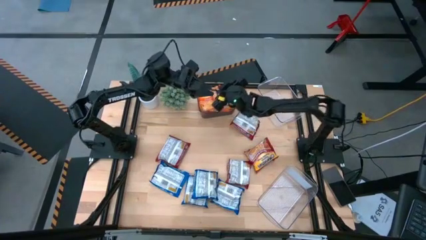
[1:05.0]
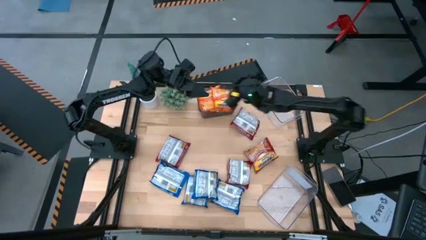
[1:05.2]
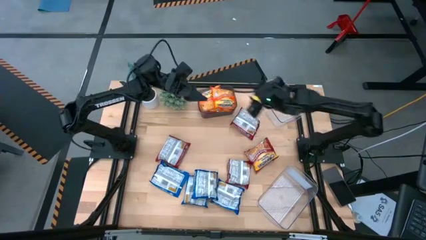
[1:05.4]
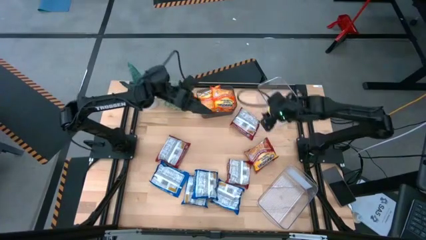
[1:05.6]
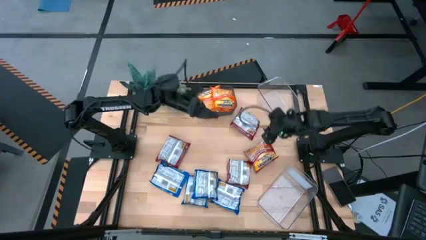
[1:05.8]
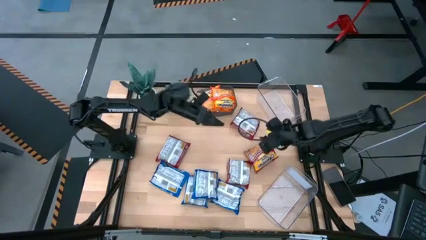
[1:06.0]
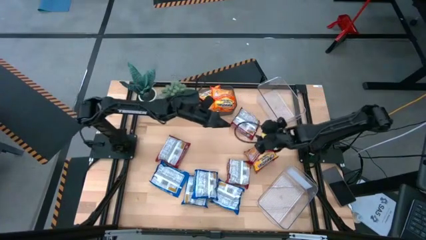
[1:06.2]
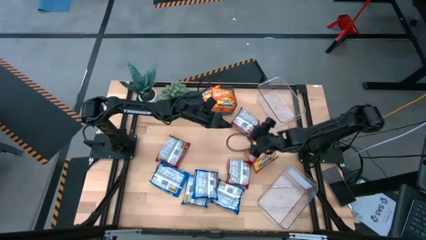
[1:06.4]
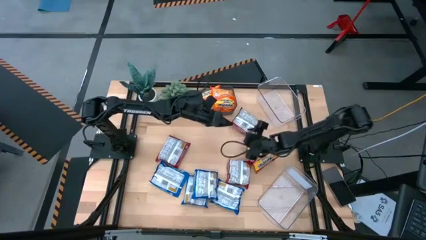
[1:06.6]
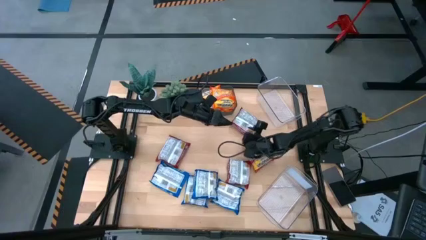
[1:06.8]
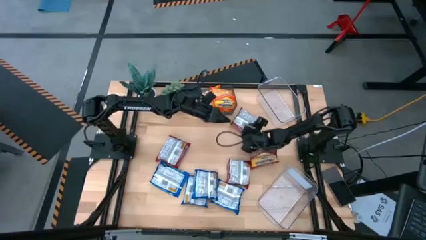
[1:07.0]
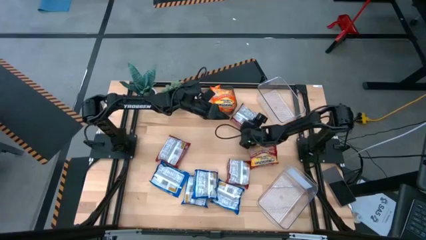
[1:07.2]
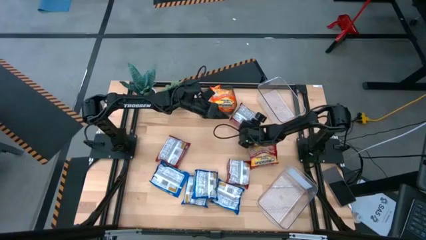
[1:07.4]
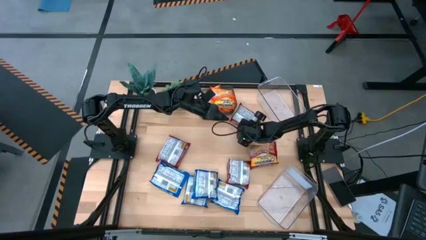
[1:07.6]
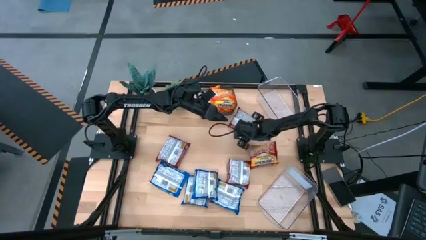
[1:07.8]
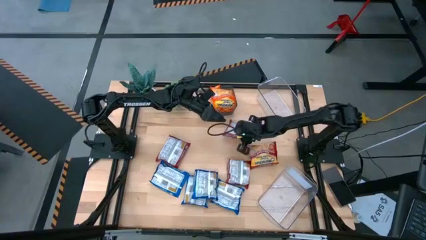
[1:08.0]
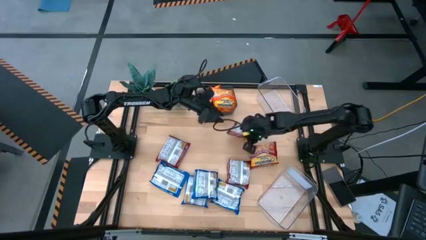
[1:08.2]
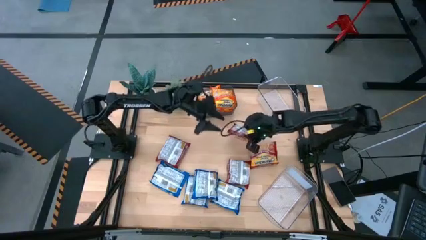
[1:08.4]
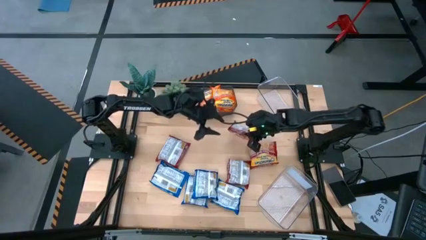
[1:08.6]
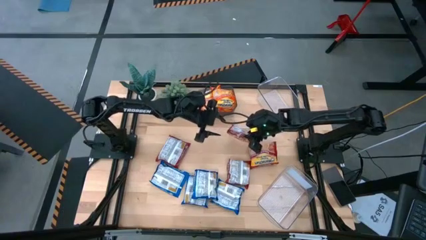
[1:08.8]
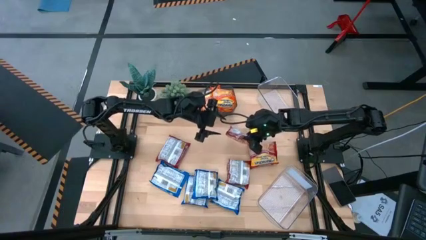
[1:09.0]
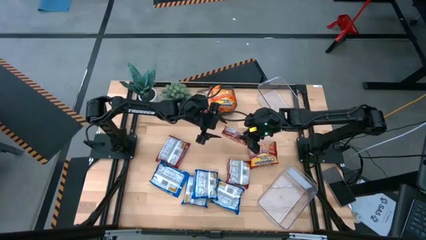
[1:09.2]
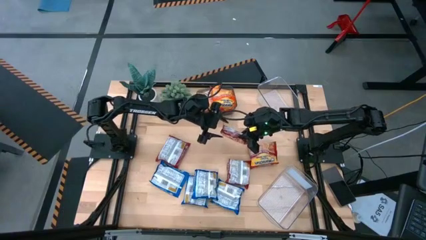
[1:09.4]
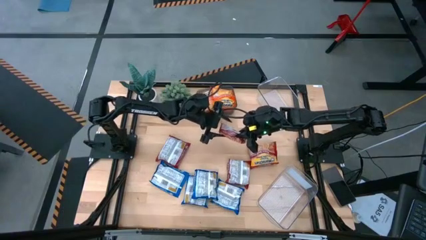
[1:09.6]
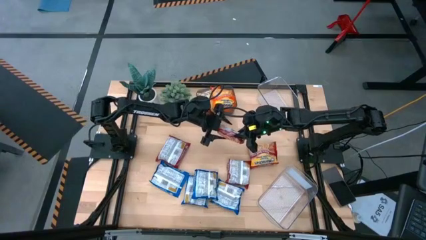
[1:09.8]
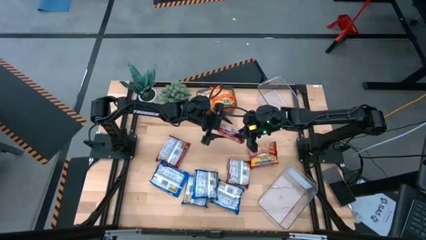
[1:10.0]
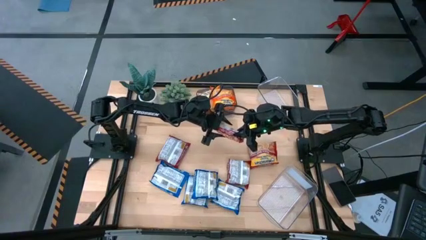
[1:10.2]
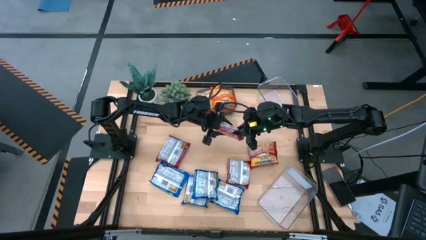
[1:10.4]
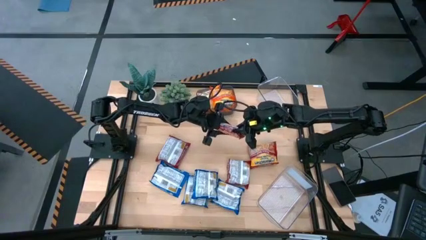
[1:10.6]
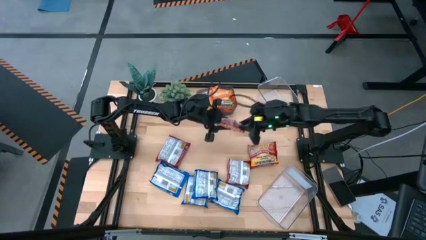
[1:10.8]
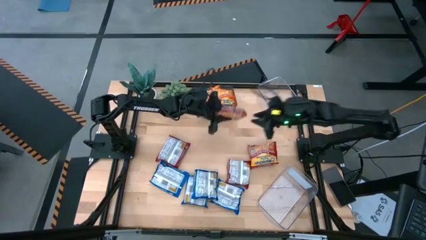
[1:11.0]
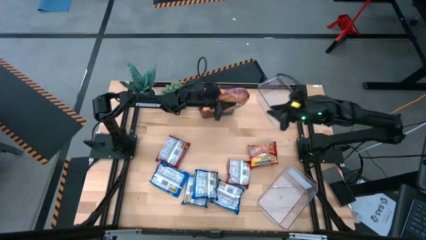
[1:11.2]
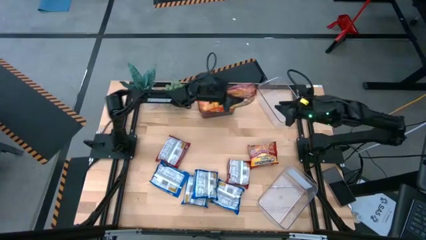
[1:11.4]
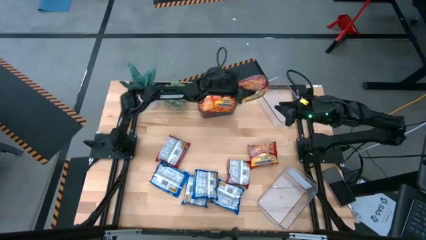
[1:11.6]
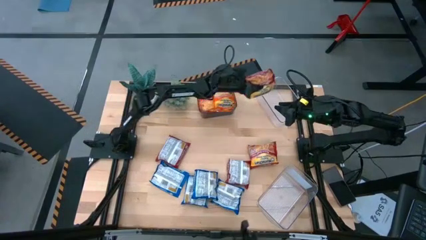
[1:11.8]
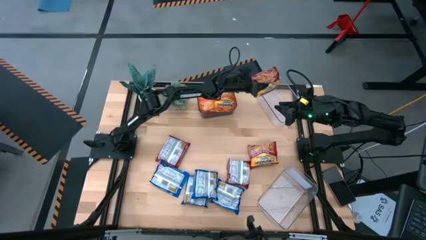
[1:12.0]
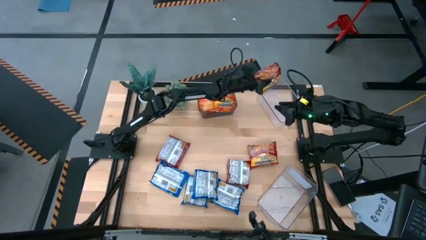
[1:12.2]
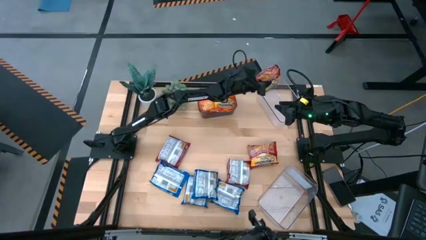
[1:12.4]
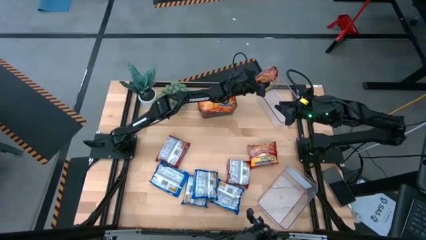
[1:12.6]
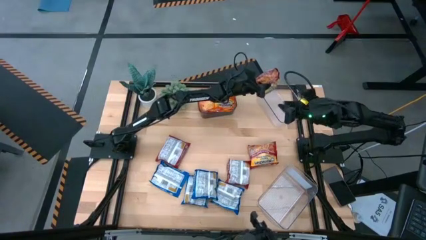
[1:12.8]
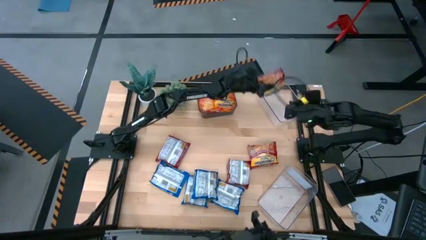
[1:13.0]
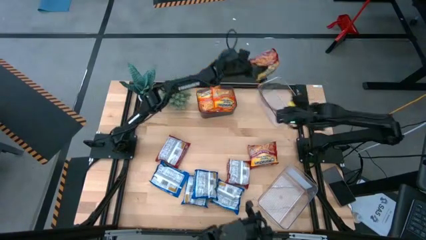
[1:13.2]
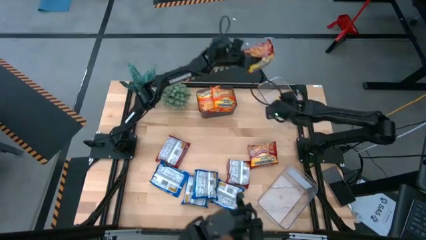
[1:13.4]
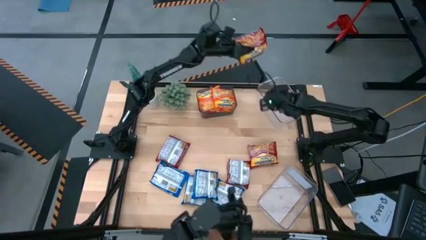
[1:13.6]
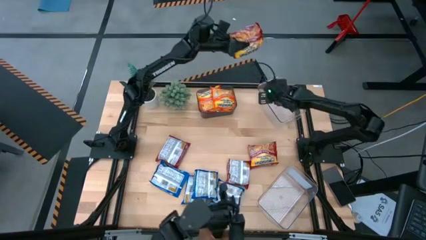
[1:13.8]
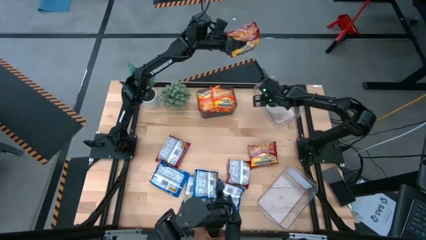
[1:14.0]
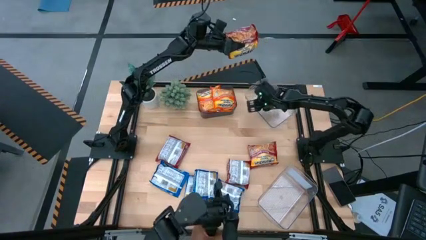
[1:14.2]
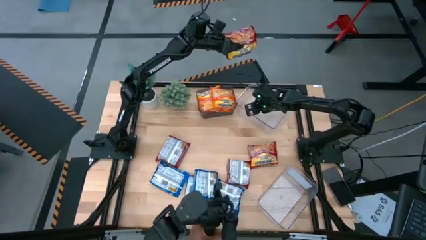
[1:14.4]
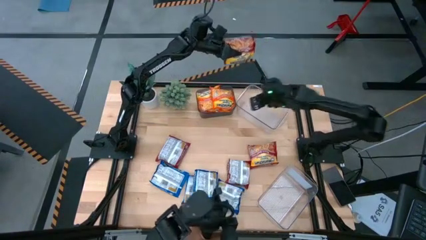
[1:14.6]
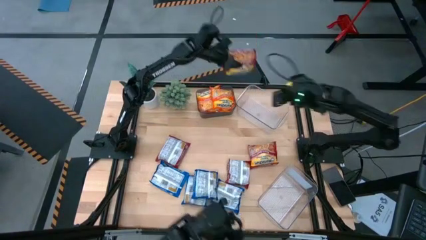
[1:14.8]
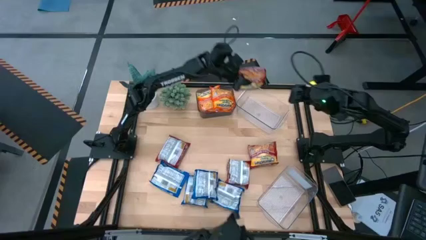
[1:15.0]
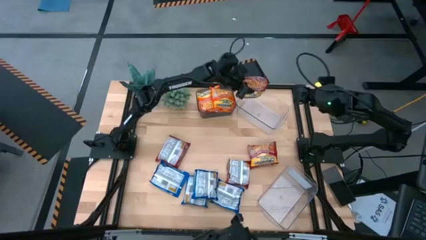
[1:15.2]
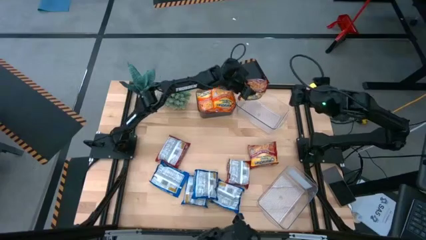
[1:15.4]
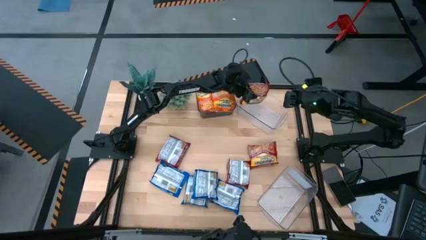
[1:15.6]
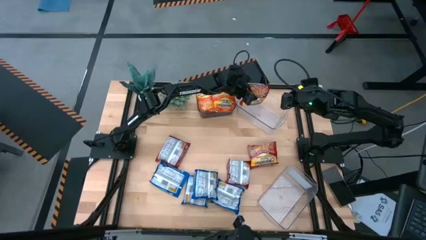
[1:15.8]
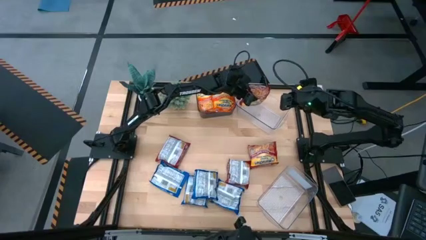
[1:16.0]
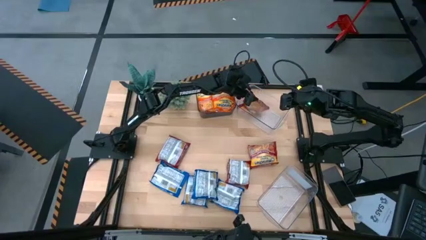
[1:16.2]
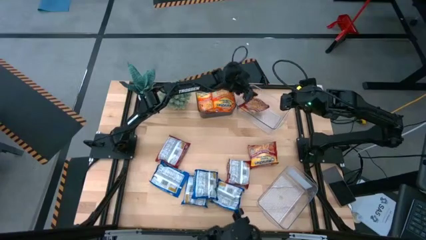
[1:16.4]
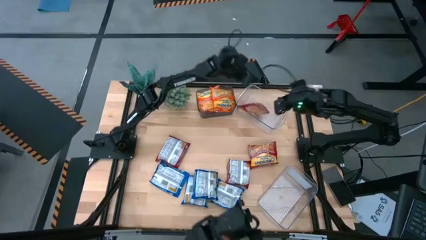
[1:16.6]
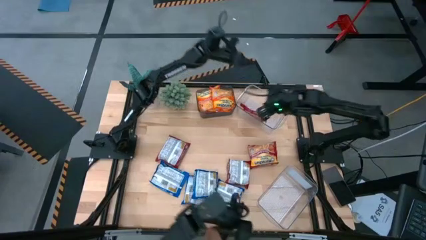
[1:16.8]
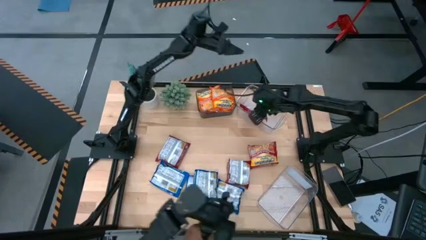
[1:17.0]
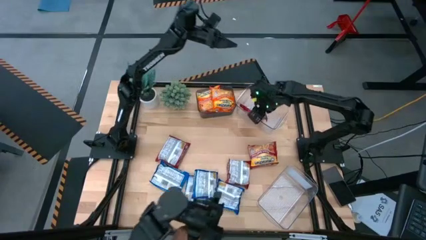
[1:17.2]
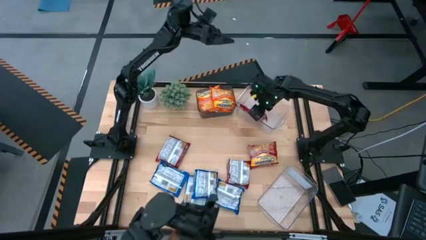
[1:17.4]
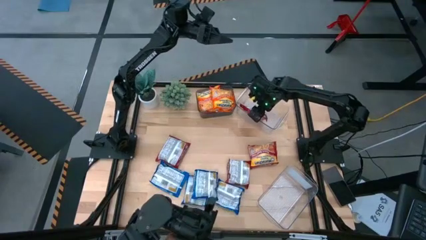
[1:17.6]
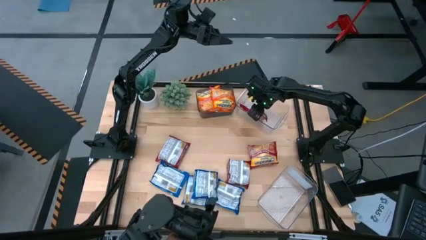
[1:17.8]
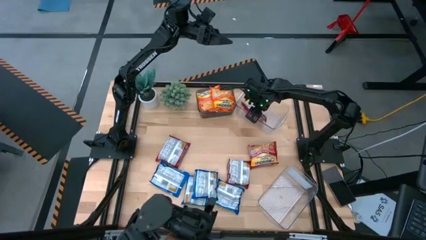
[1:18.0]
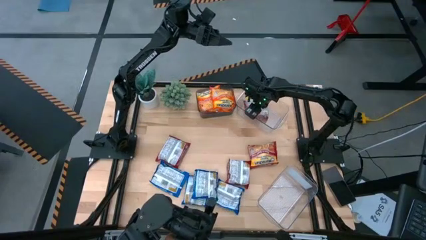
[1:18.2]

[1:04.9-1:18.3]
Task: Sort Maruchan noodles
Put the red noodle pack into the top transparent bin

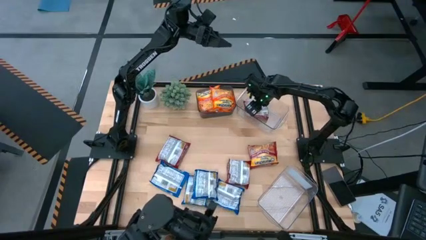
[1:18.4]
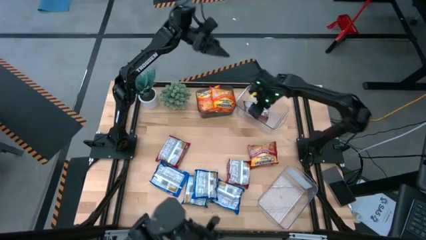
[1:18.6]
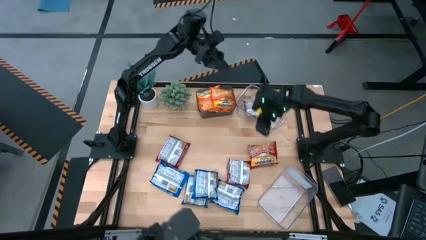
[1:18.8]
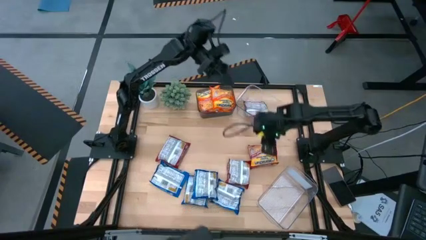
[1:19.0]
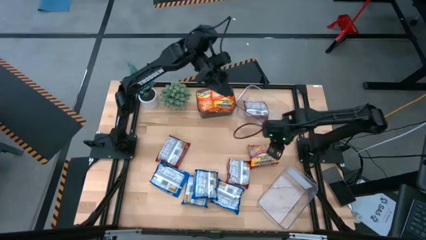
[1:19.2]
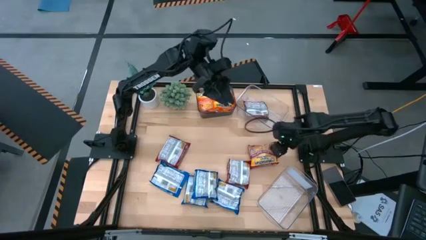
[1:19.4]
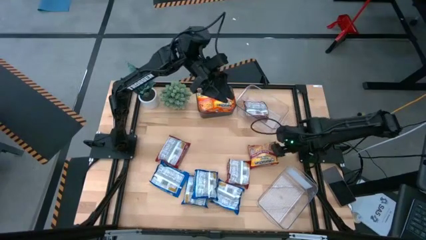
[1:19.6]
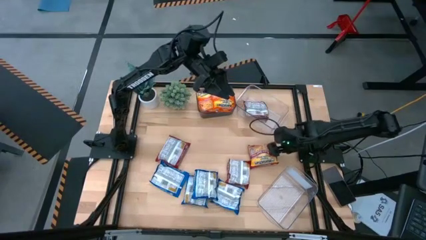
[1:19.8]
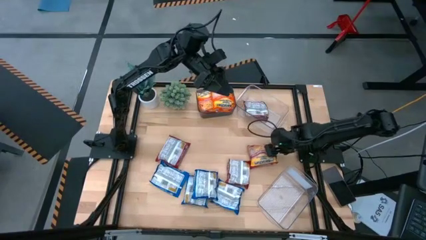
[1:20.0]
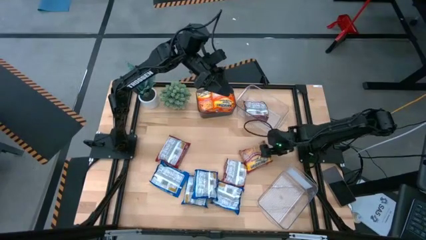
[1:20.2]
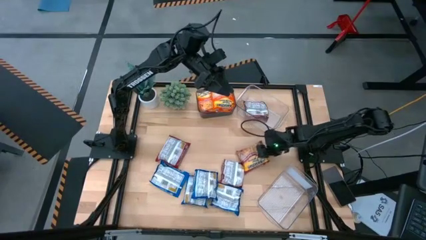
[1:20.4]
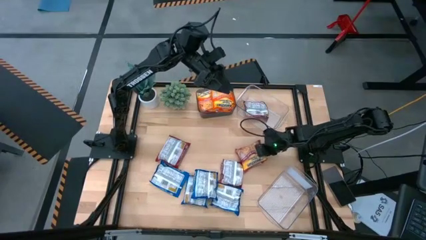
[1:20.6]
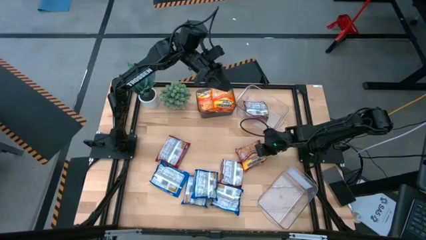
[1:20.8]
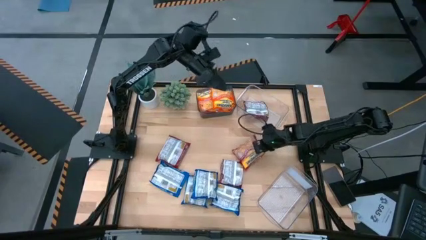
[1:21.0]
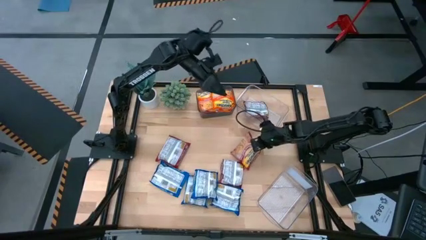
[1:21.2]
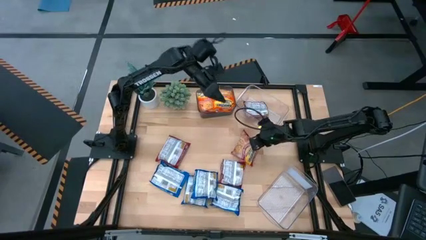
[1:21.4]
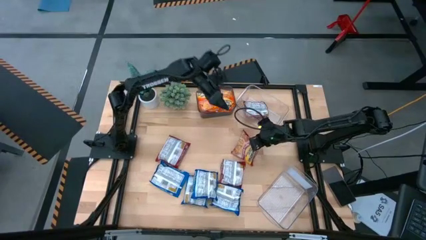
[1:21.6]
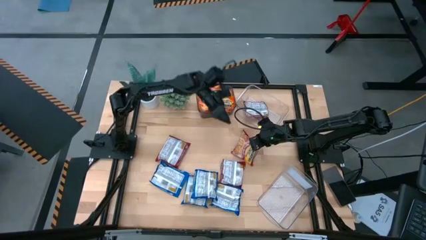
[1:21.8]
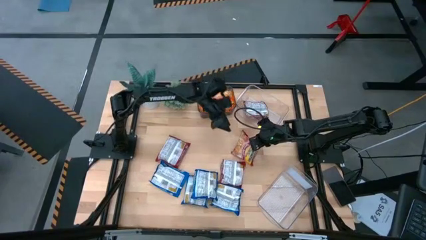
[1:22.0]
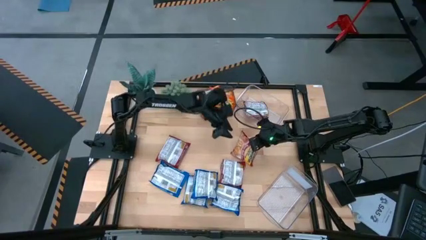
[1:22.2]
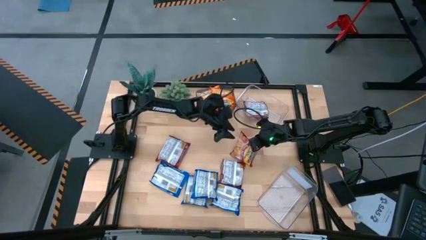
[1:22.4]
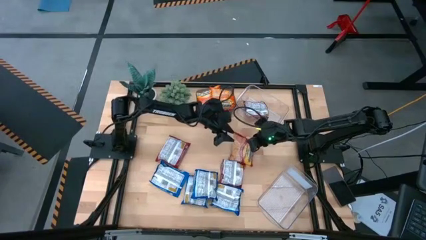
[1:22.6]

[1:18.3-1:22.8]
Put the red noodle pack into the top transparent bin
